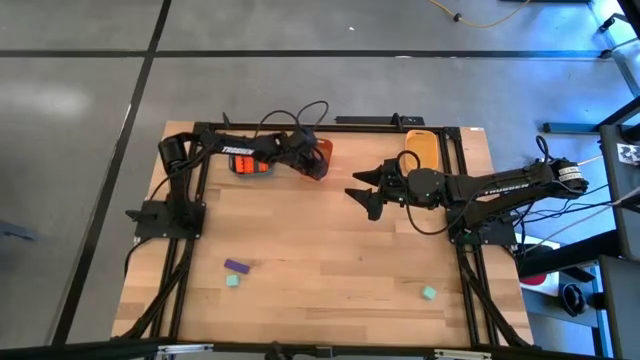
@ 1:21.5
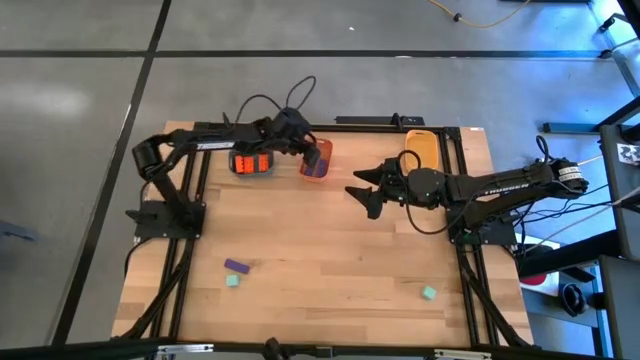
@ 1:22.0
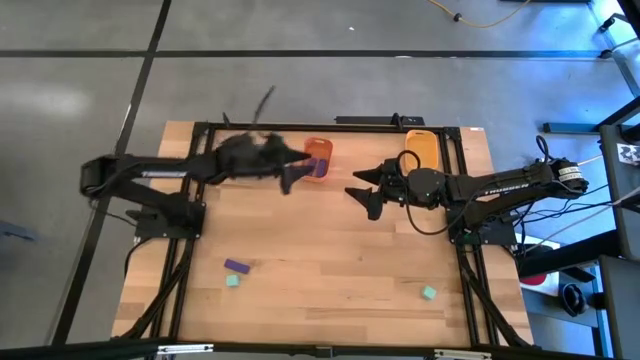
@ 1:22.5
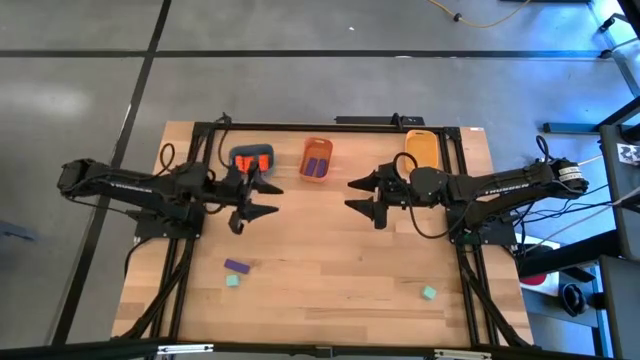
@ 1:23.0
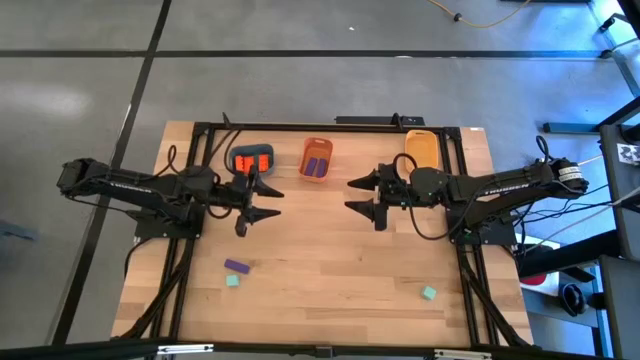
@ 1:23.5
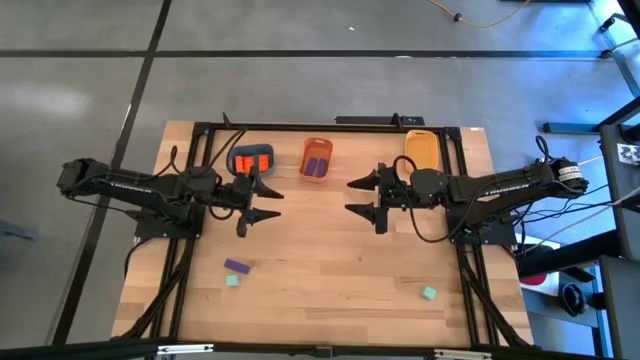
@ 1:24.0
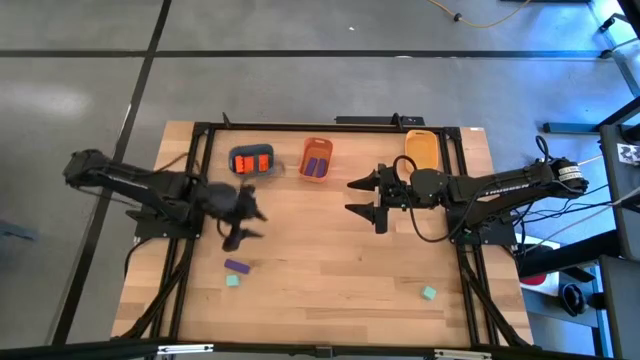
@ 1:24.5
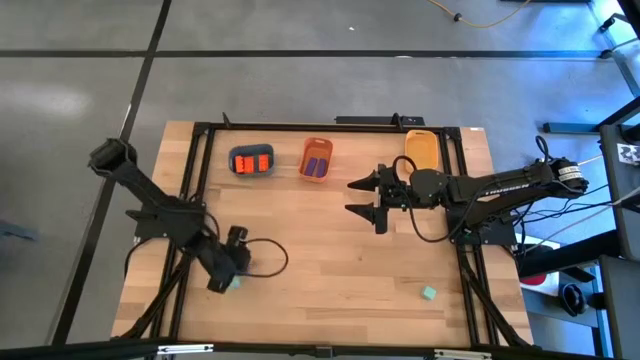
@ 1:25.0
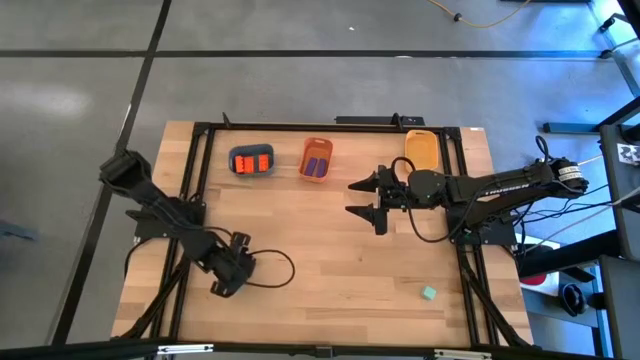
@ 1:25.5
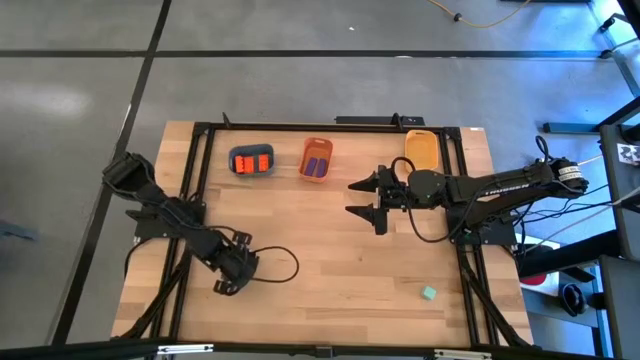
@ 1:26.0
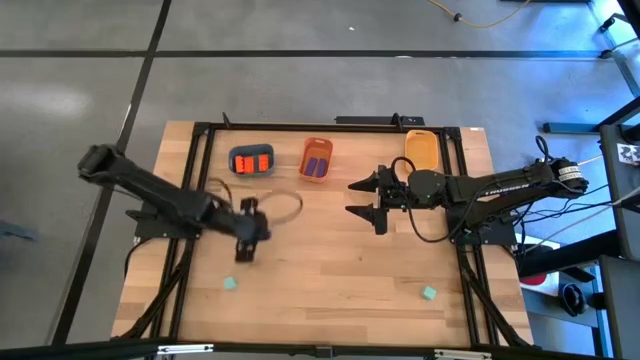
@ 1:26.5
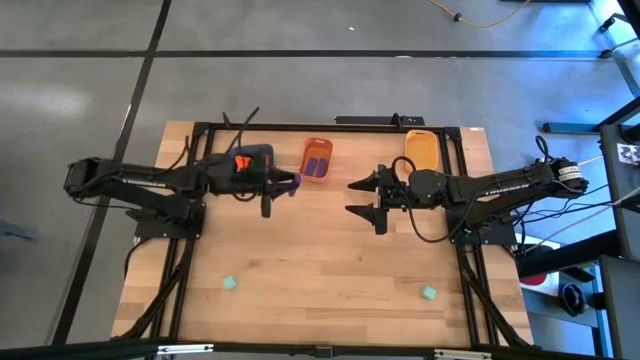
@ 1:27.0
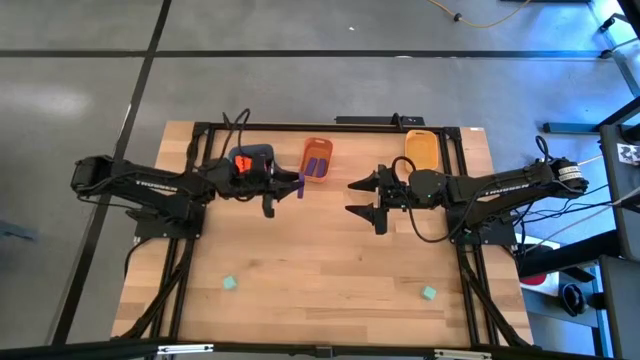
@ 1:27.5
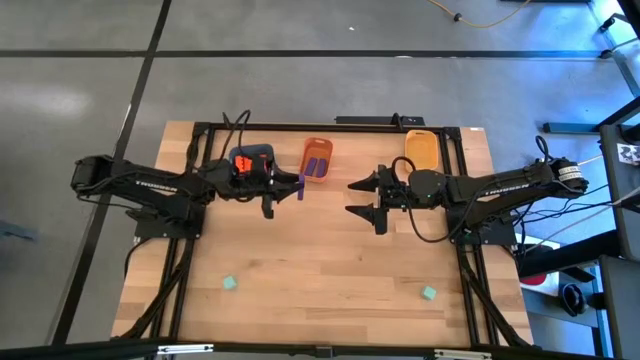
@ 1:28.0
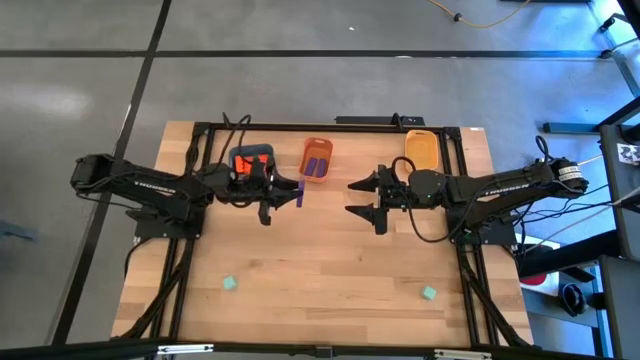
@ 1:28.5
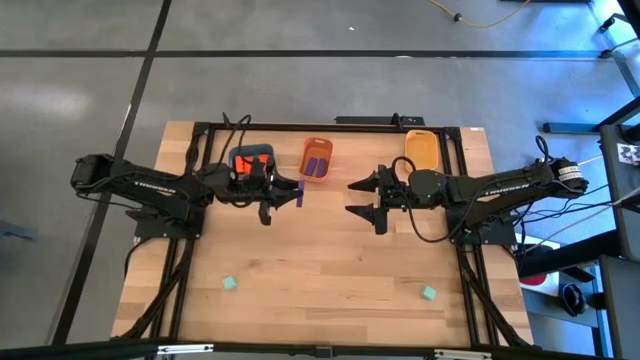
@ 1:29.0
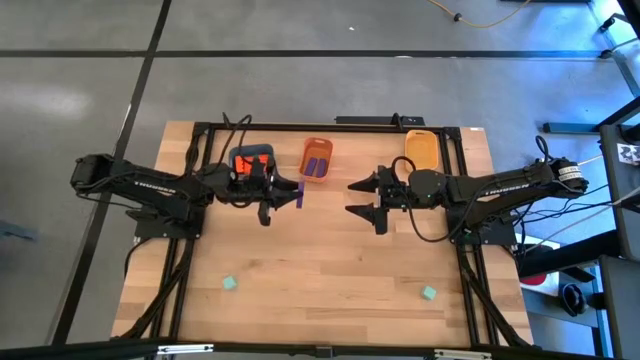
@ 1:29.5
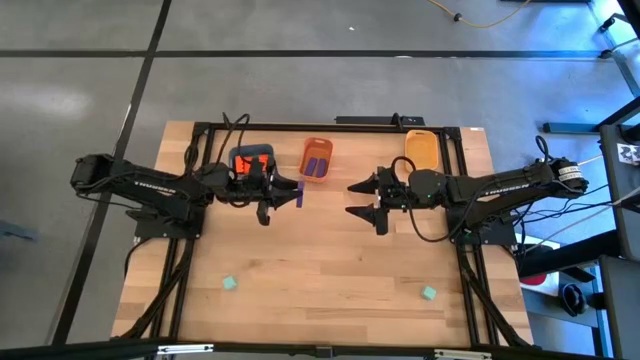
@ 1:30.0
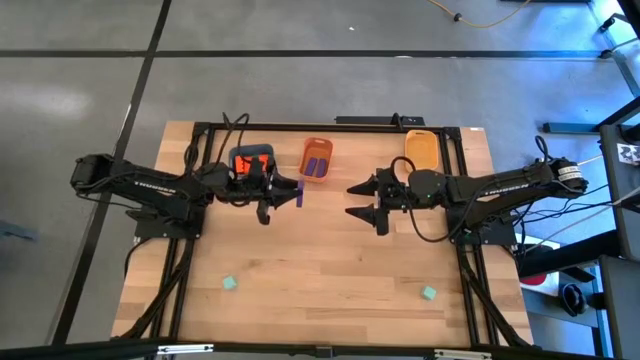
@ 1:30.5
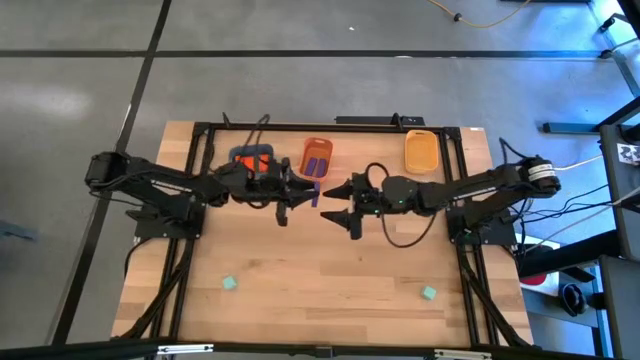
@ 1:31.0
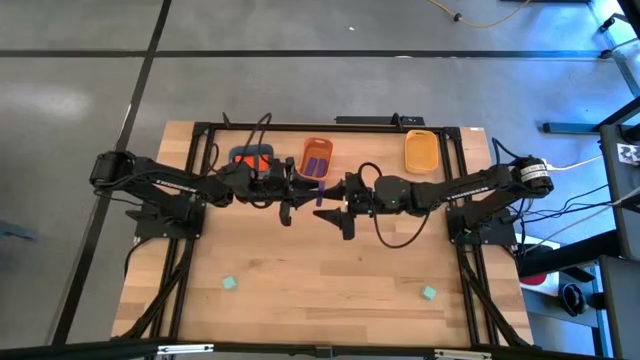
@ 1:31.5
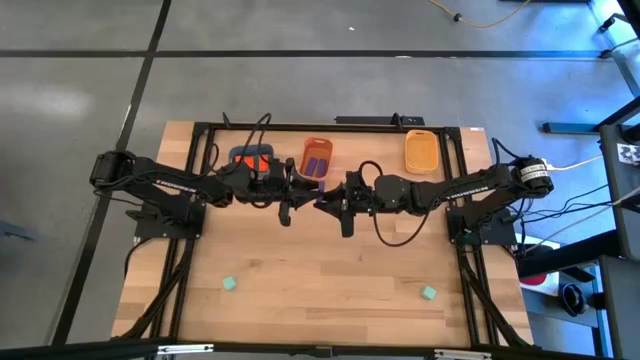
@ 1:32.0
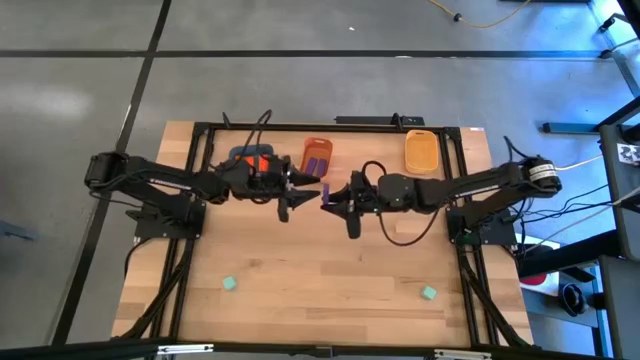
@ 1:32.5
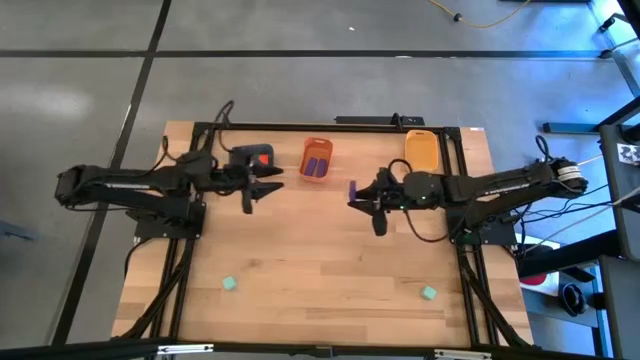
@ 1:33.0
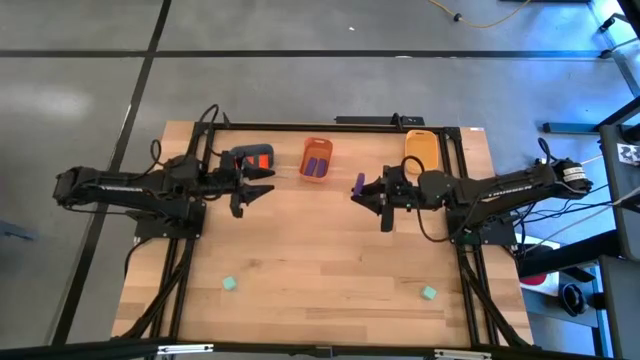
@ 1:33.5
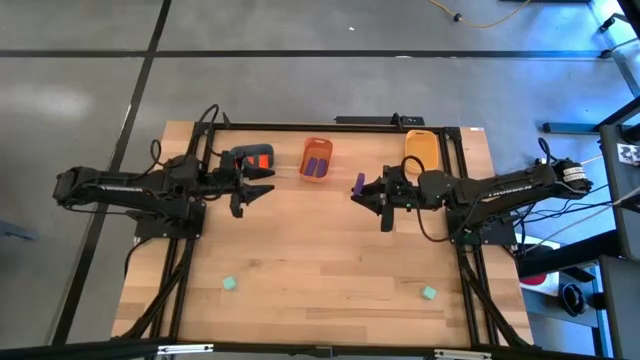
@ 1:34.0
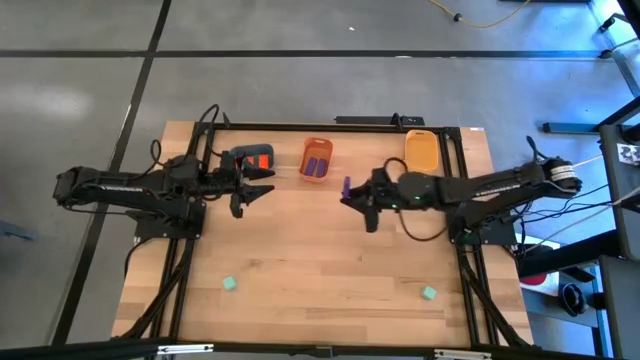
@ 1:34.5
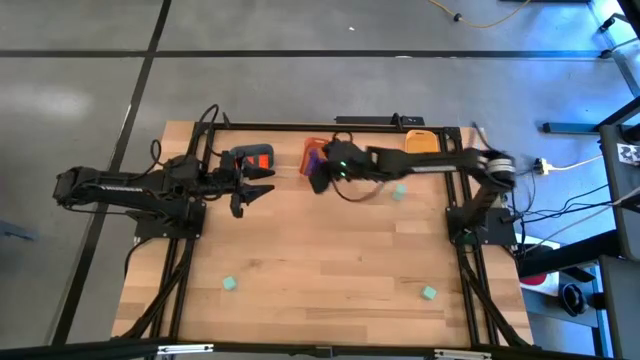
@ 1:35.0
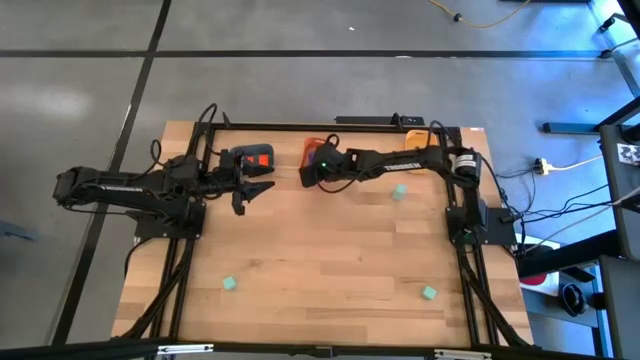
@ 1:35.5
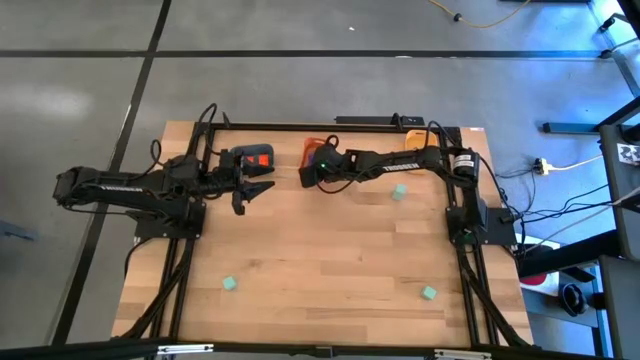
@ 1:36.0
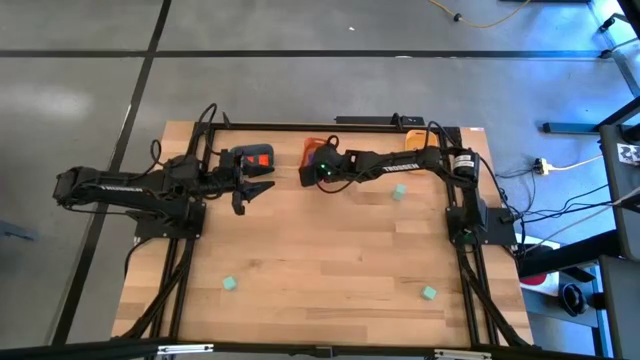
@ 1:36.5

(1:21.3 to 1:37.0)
Task: Sort & place blocks by color
Put the violet block into the orange bin

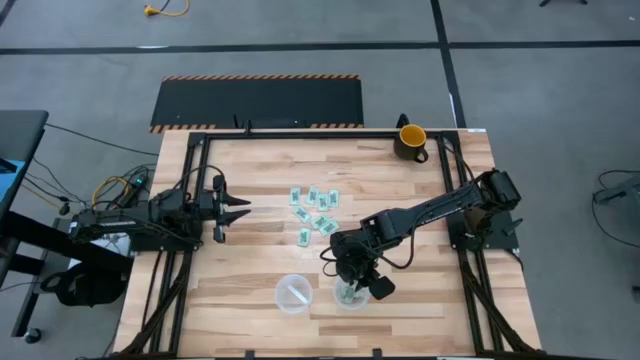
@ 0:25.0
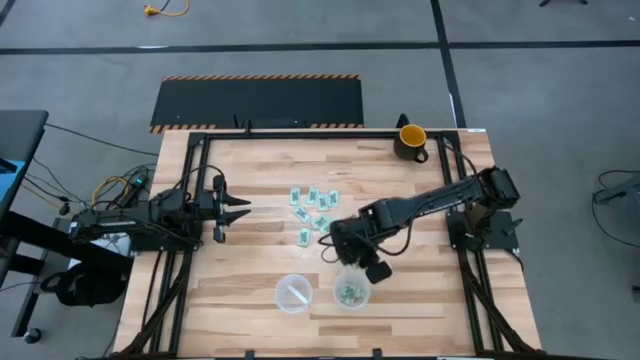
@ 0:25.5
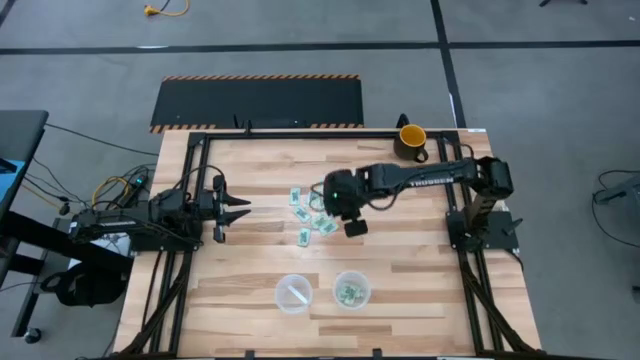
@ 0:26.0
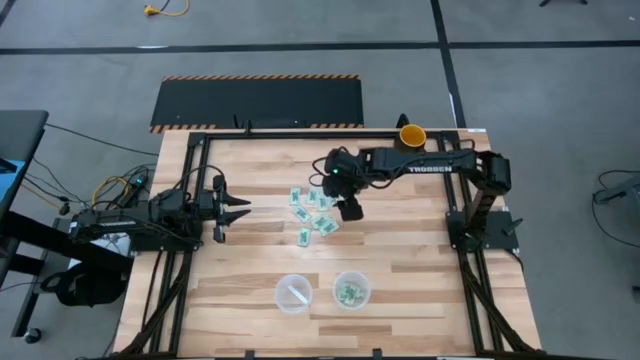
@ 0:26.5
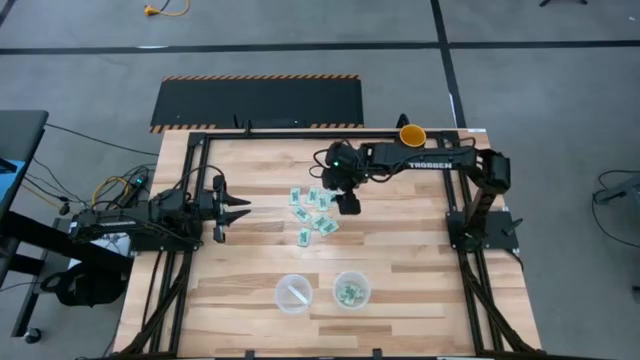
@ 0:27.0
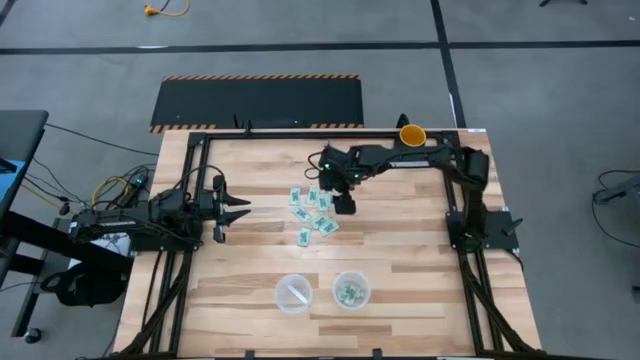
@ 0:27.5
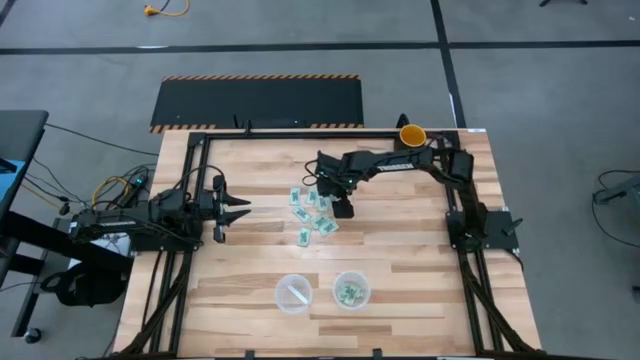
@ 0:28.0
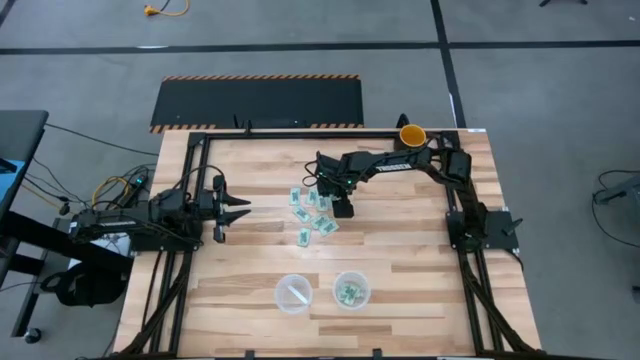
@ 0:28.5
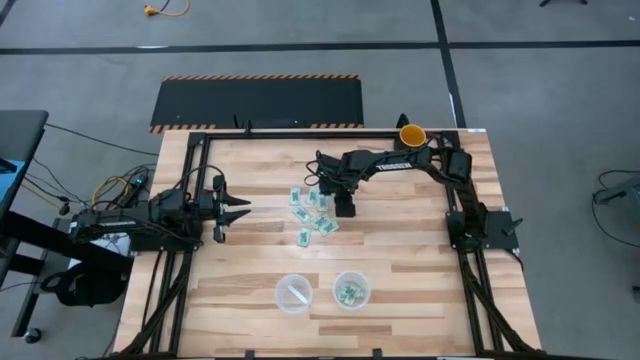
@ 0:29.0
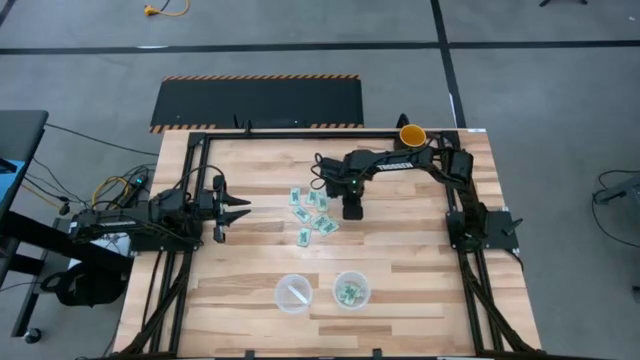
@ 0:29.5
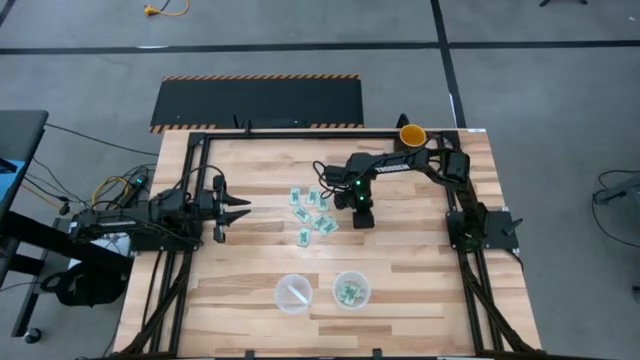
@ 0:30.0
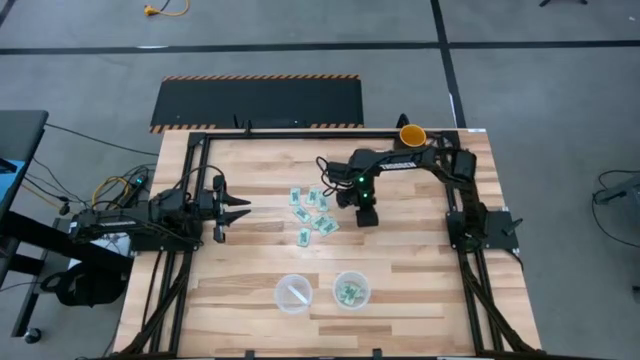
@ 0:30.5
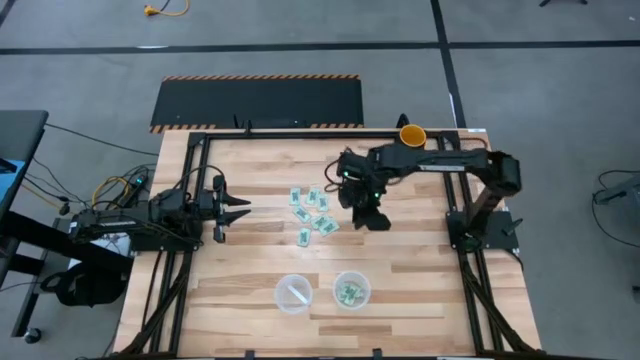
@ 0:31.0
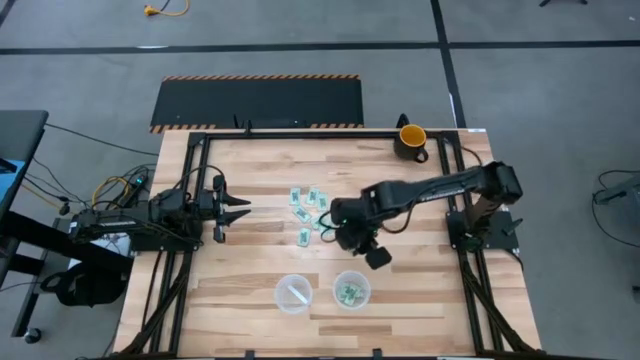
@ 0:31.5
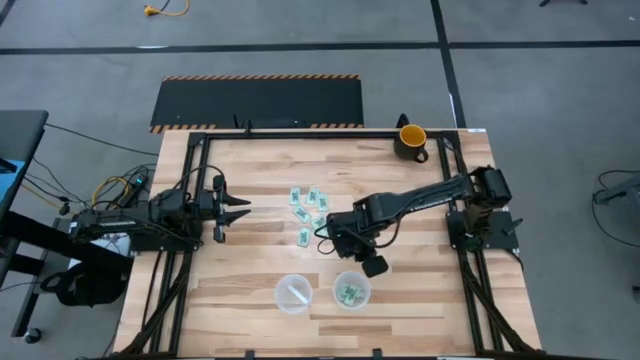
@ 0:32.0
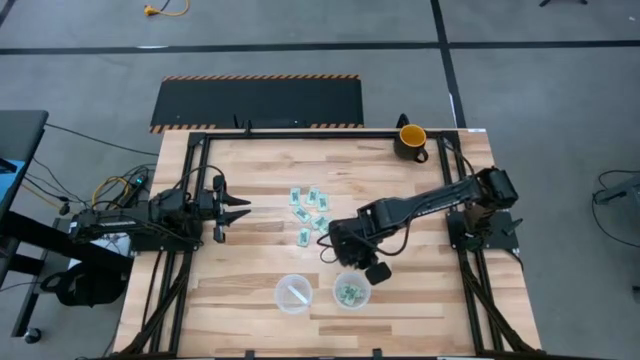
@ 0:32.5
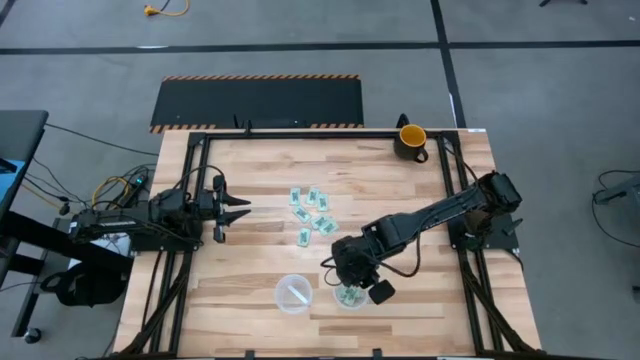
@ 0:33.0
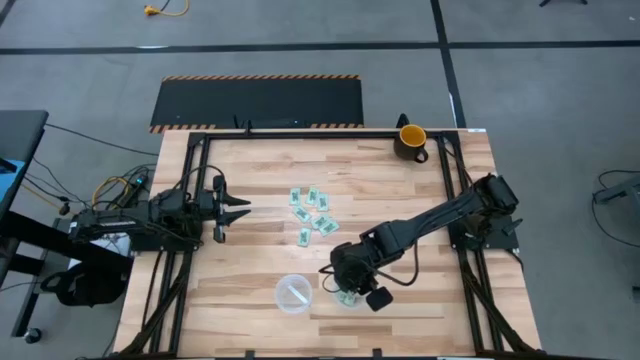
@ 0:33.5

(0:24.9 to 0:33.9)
Task: Pick and place Stevia / Truvia into bins
Put the white stevia pack into the right transparent basket
